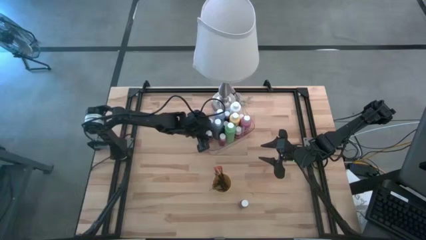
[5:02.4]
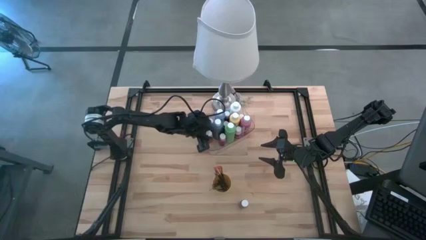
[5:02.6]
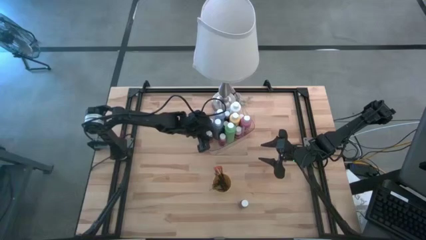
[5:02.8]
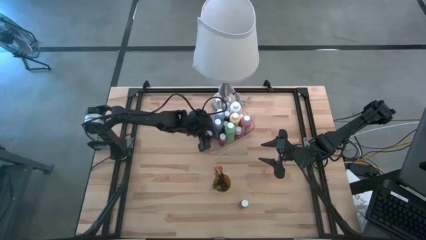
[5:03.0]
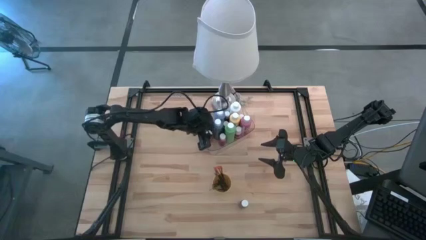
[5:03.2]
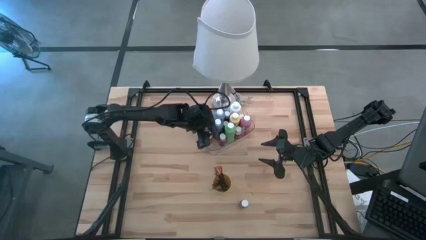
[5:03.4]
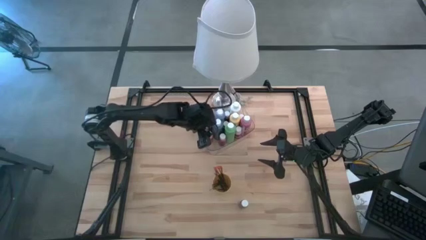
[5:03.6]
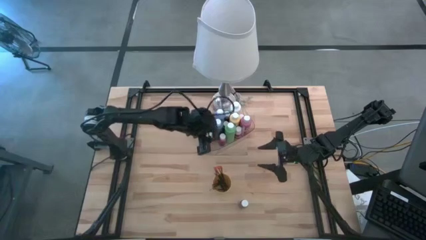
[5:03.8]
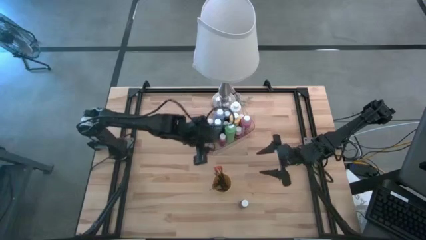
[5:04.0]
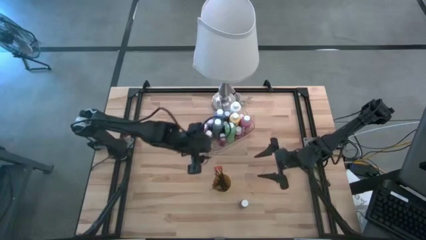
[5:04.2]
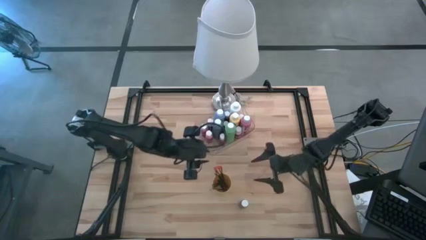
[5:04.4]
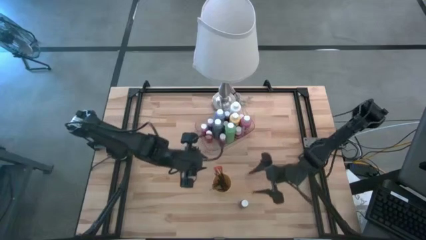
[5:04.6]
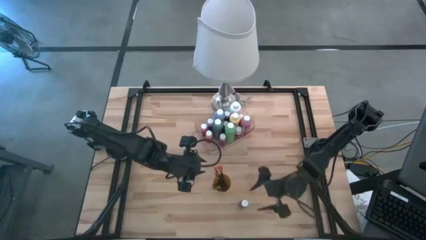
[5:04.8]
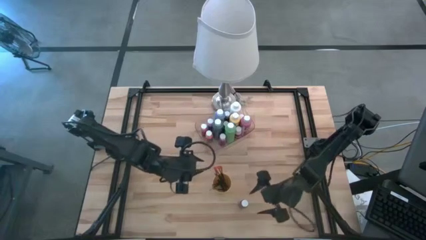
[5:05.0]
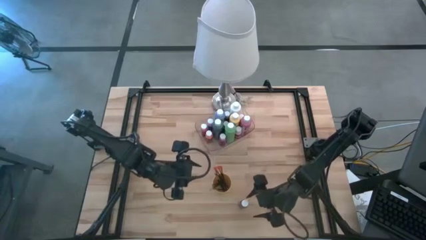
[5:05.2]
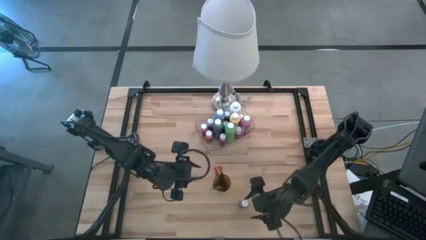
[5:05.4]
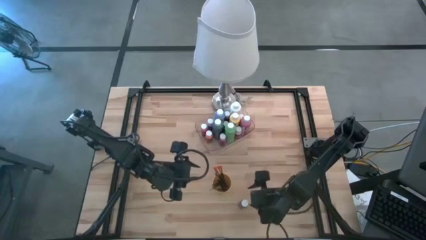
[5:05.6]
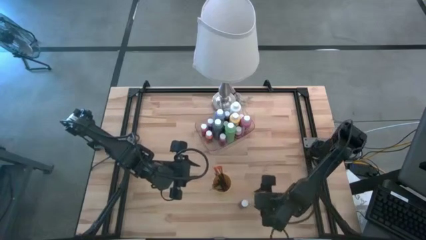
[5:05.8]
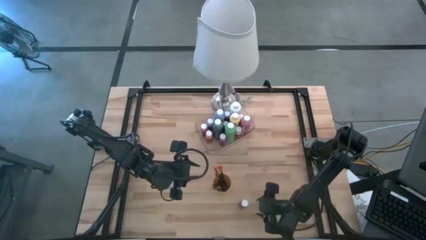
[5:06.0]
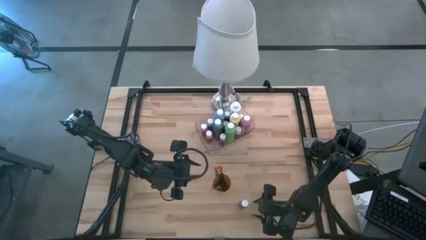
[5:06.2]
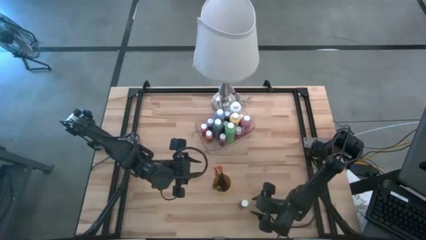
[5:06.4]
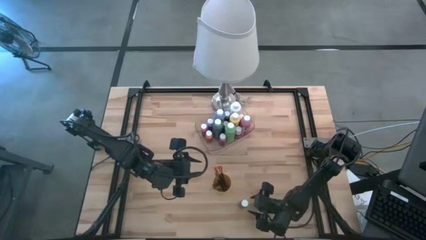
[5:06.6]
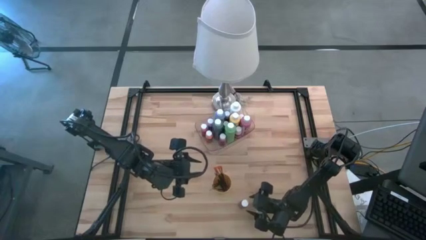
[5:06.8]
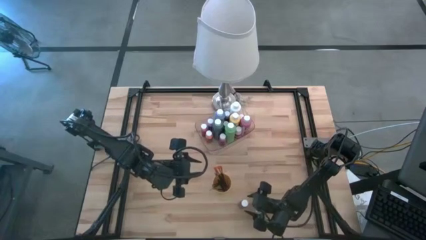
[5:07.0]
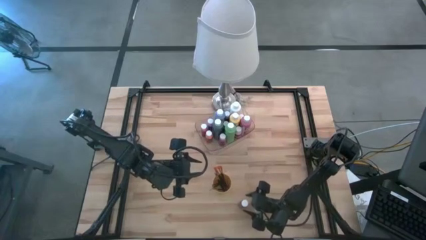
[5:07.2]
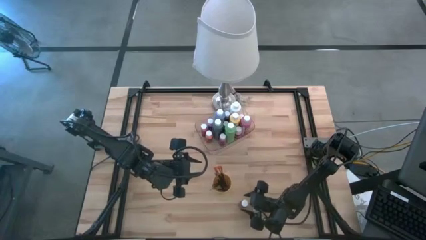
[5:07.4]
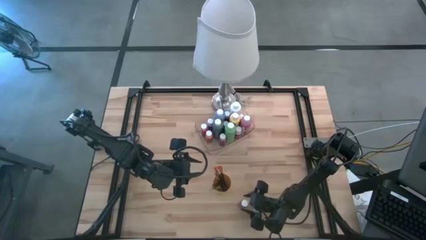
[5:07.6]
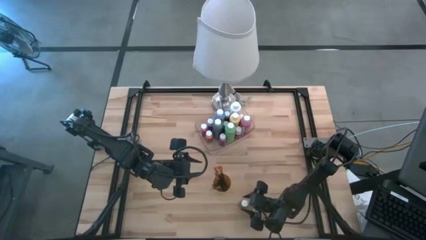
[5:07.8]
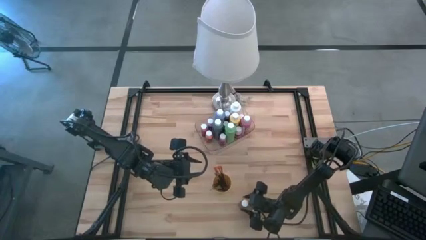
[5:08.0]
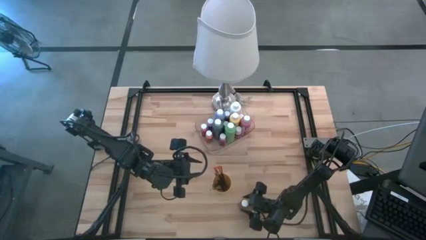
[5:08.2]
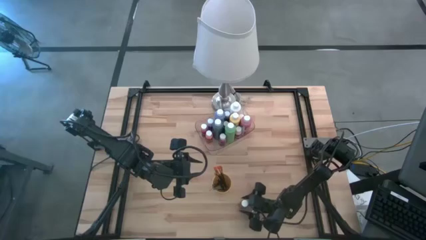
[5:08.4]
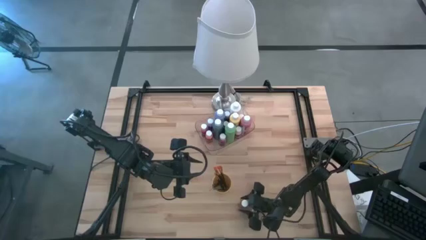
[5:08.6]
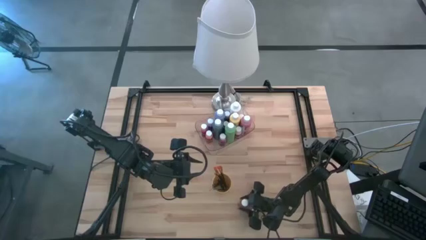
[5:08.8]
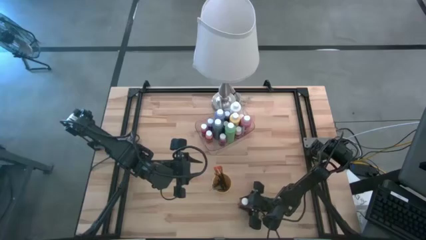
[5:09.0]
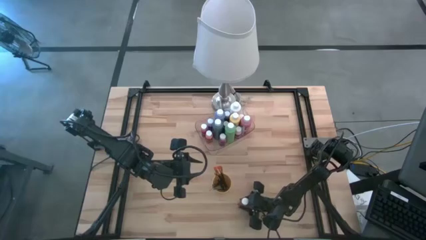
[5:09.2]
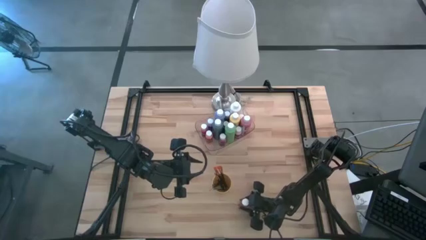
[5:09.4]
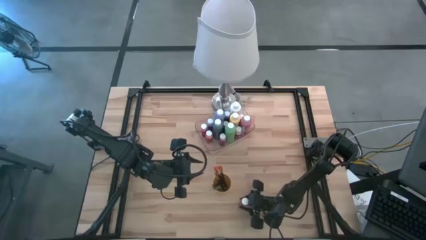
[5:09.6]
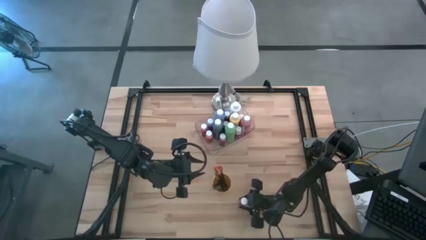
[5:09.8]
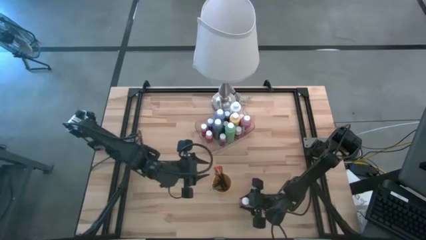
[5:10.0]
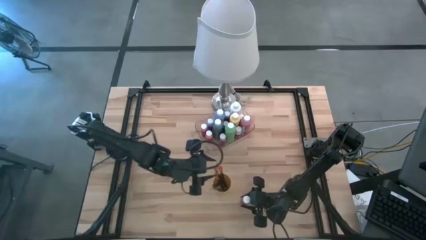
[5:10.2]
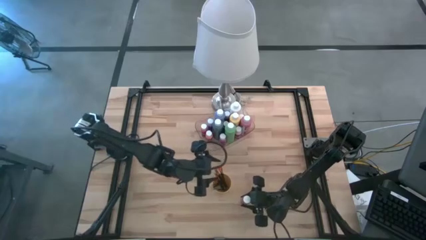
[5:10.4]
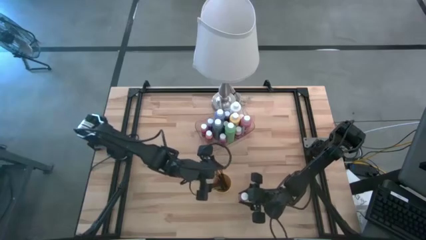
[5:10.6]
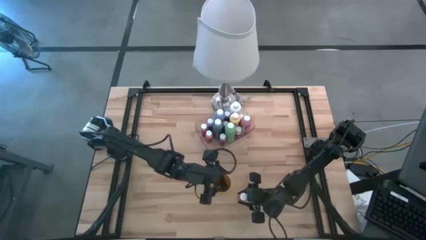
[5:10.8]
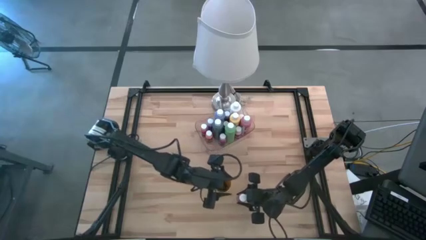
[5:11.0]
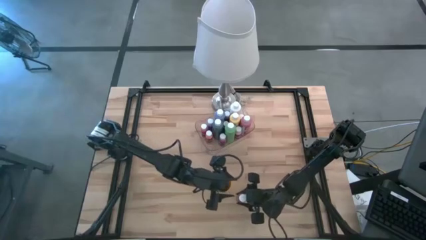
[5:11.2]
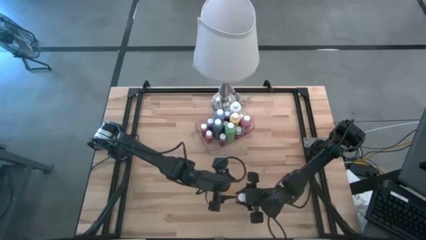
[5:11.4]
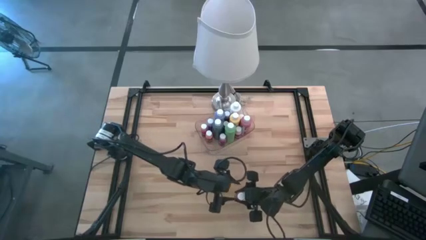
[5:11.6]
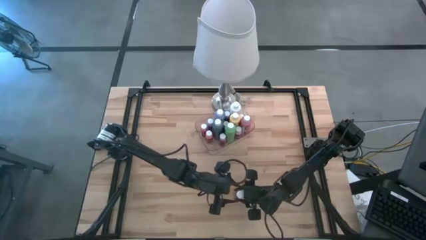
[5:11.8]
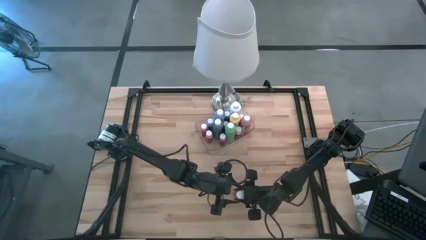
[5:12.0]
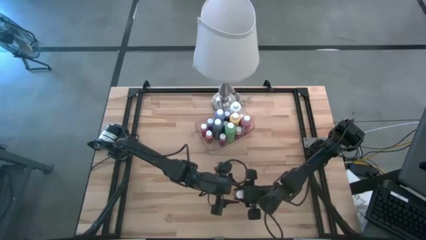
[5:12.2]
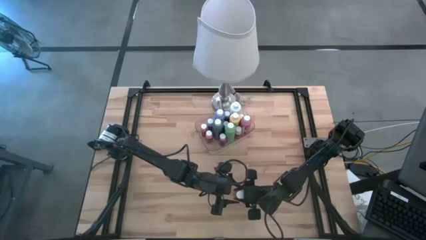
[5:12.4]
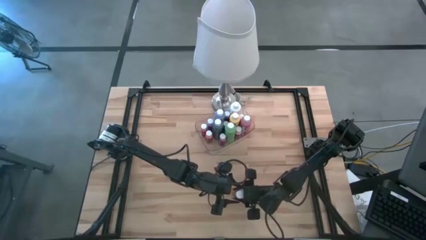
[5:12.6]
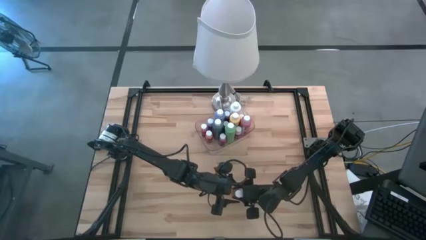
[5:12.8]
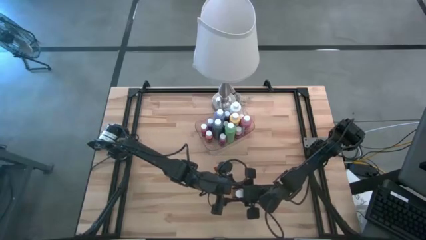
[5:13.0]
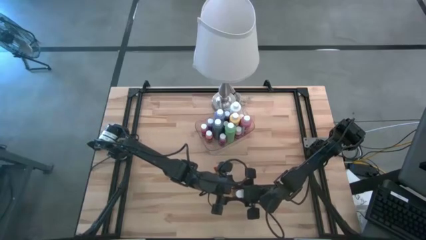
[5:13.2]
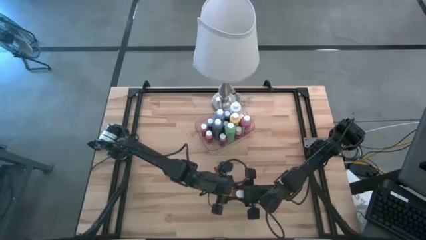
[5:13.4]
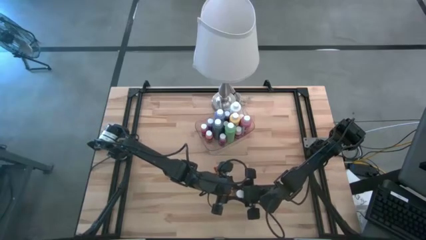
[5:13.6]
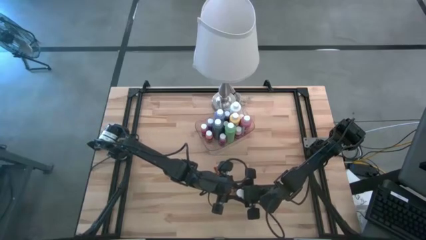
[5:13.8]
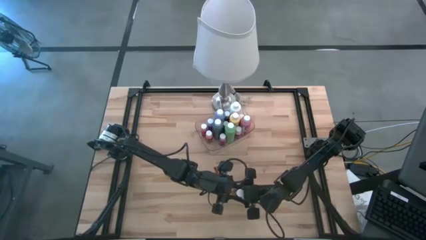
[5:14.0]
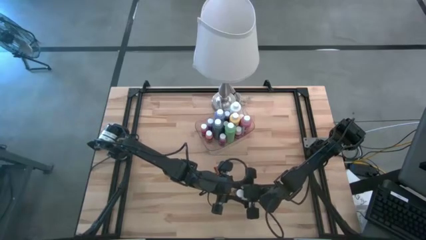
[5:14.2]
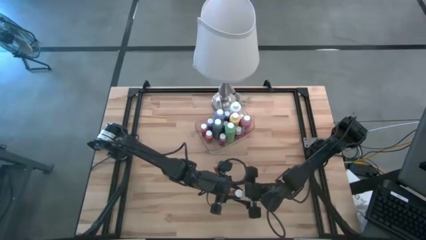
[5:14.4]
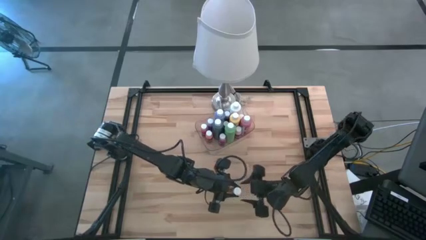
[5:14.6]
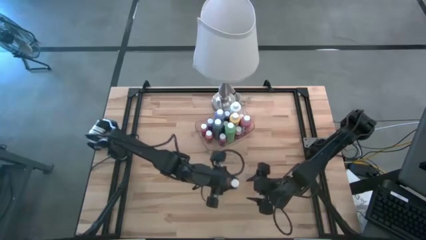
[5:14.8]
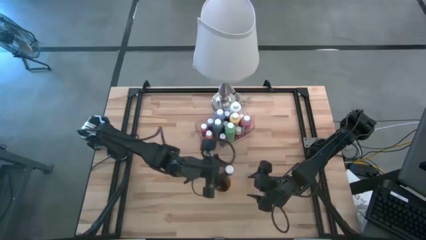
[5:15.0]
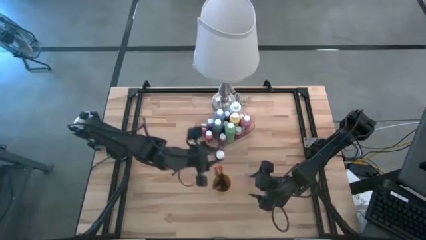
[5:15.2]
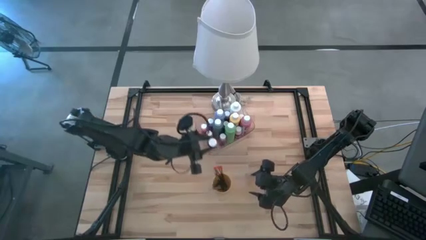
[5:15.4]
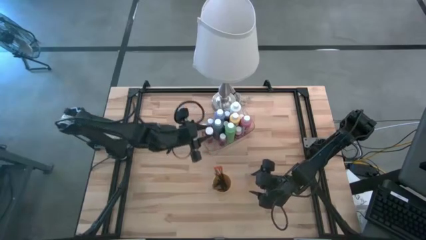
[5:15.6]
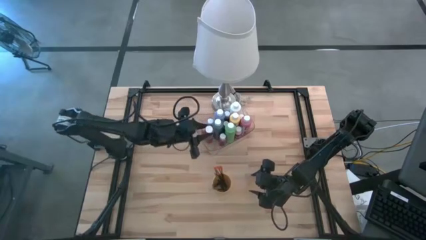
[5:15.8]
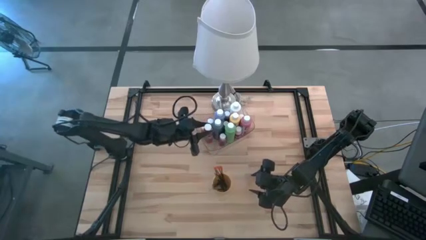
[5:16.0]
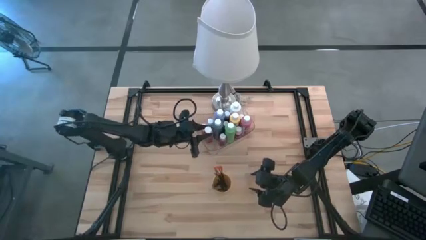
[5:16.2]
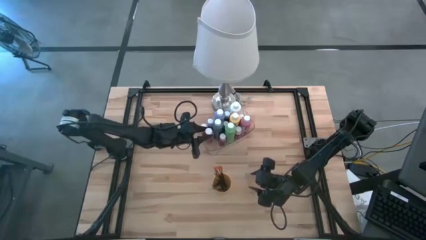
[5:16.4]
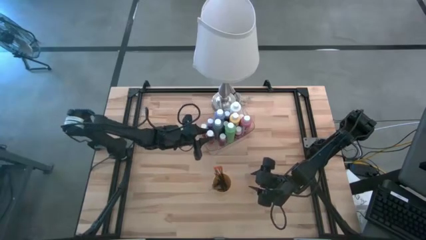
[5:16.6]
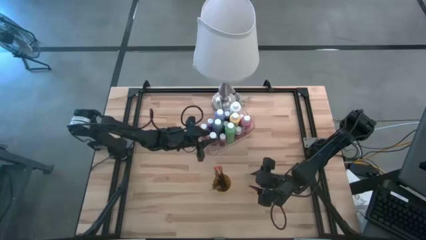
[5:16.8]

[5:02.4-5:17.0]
Task: Pick & Place Paint Supplies
Put the brown bottle into the transparent bin
